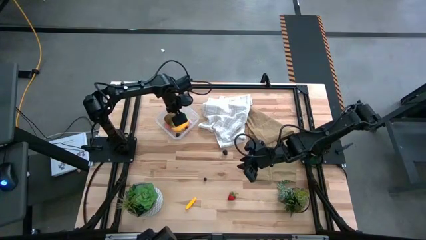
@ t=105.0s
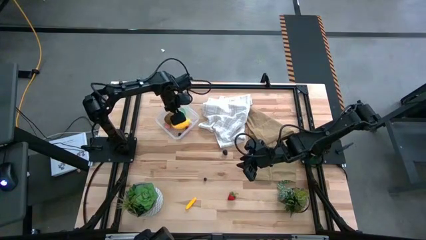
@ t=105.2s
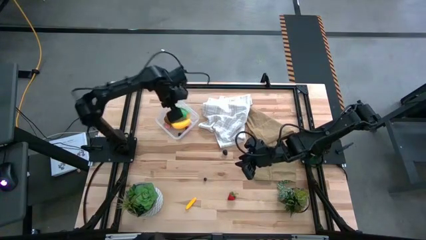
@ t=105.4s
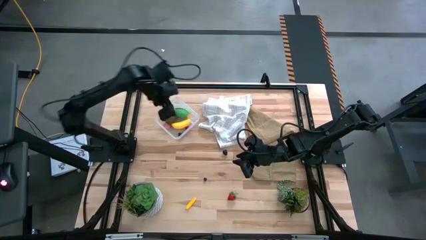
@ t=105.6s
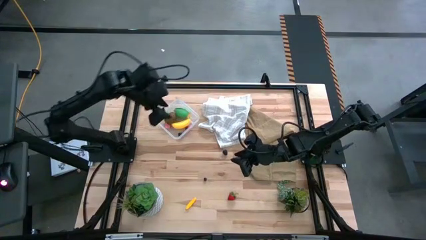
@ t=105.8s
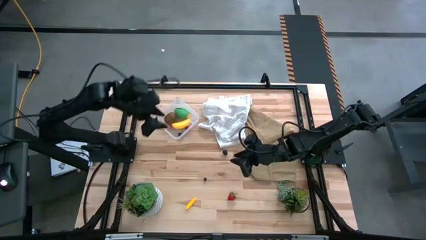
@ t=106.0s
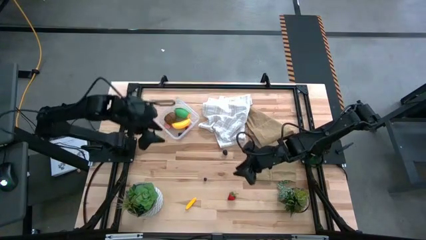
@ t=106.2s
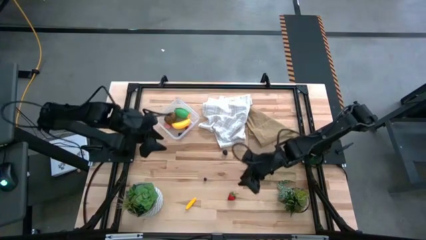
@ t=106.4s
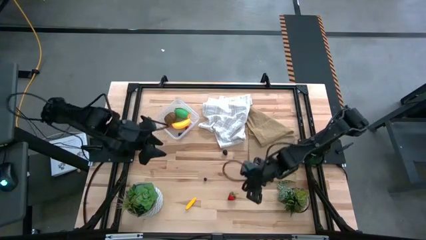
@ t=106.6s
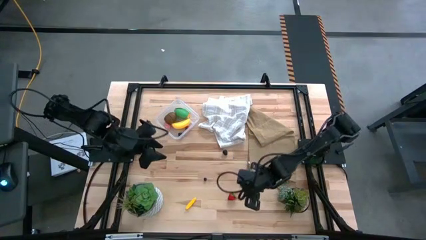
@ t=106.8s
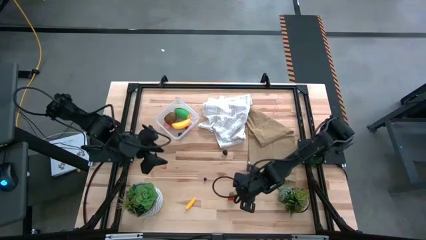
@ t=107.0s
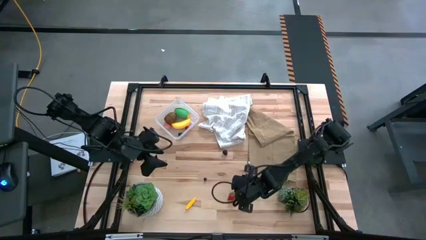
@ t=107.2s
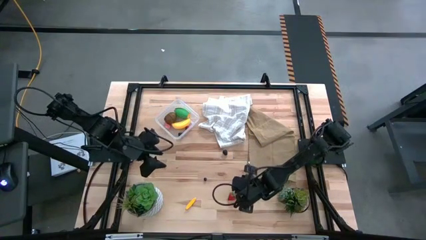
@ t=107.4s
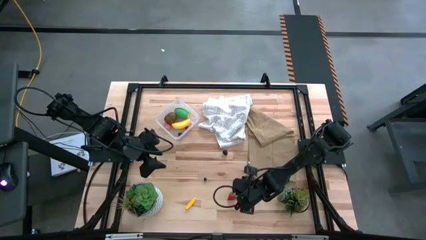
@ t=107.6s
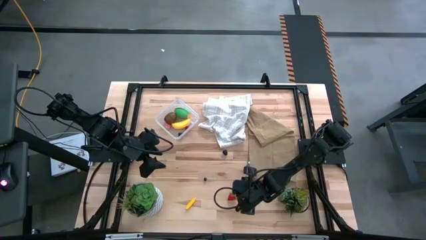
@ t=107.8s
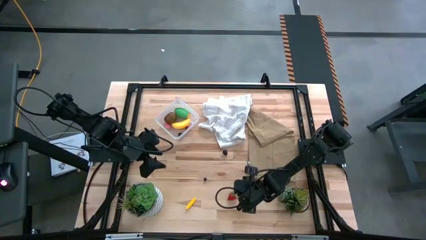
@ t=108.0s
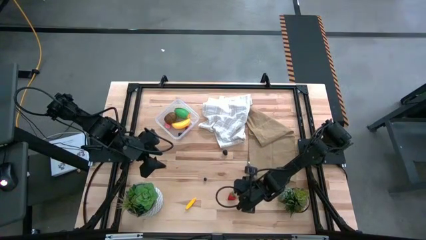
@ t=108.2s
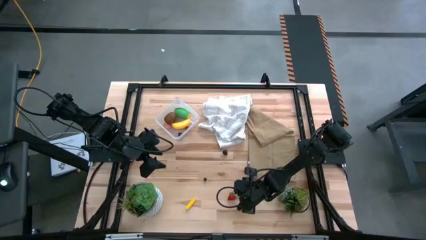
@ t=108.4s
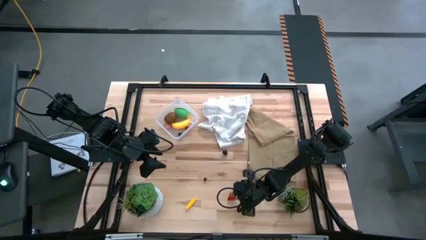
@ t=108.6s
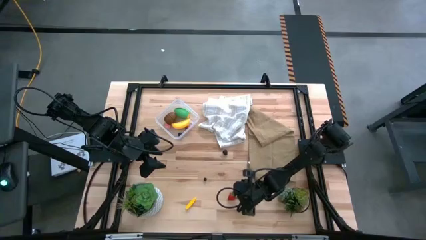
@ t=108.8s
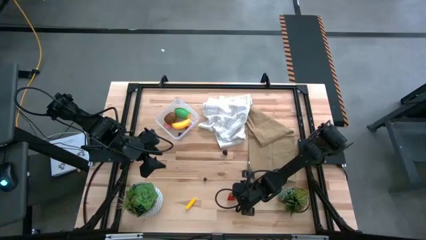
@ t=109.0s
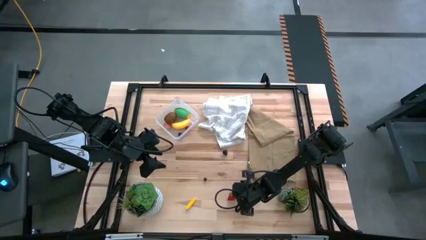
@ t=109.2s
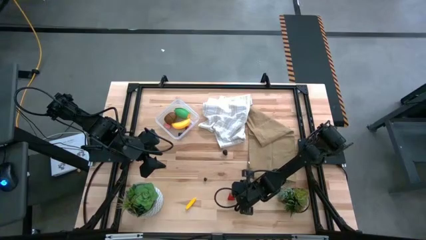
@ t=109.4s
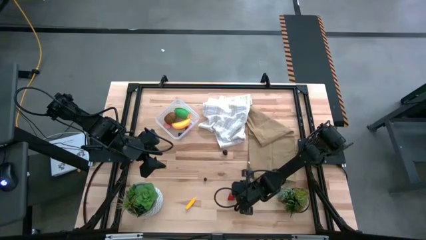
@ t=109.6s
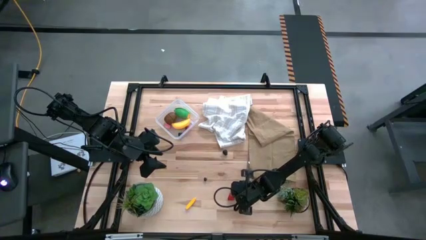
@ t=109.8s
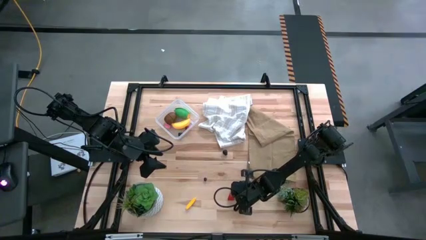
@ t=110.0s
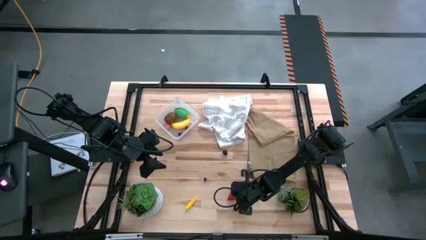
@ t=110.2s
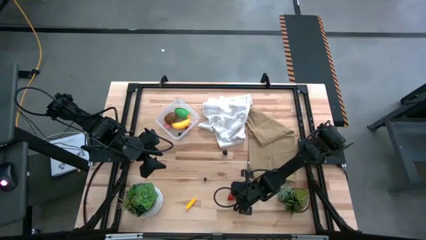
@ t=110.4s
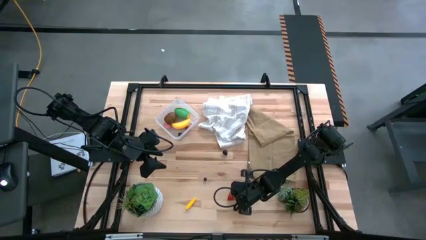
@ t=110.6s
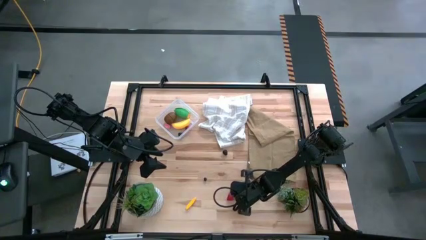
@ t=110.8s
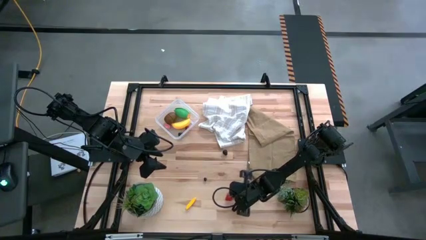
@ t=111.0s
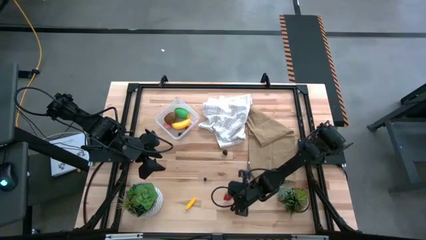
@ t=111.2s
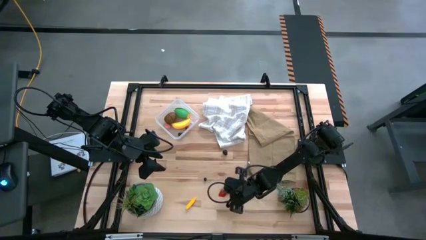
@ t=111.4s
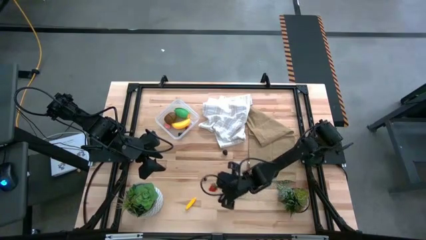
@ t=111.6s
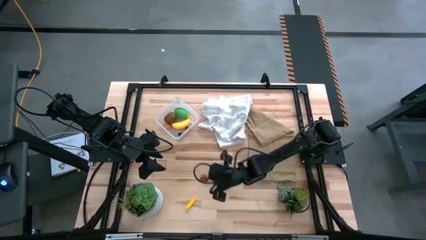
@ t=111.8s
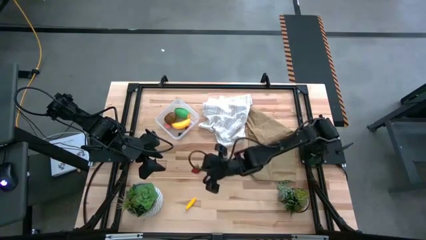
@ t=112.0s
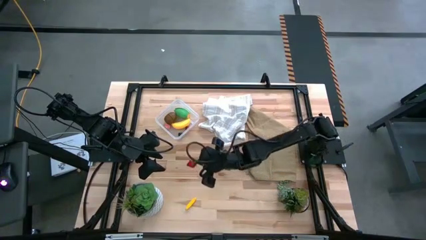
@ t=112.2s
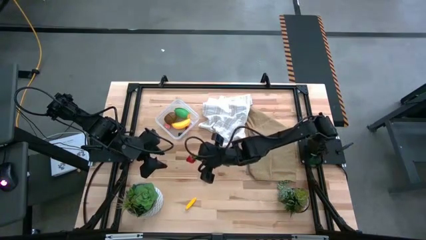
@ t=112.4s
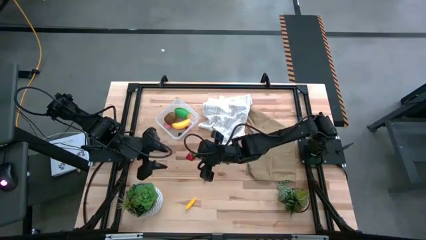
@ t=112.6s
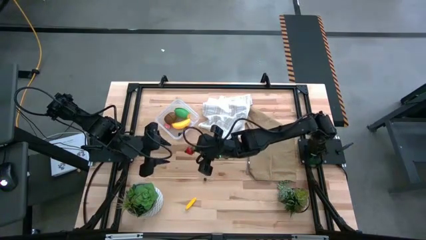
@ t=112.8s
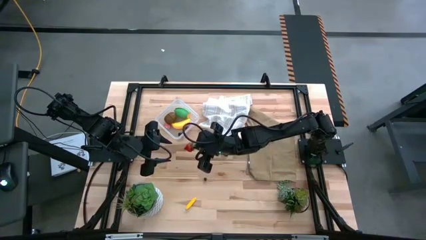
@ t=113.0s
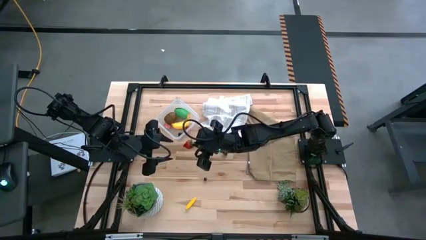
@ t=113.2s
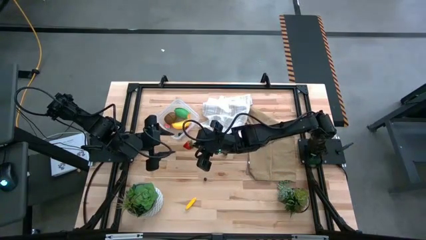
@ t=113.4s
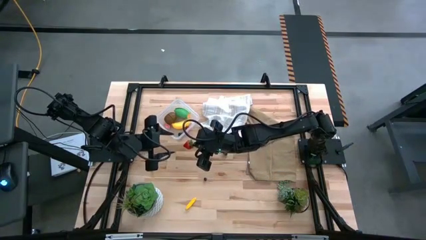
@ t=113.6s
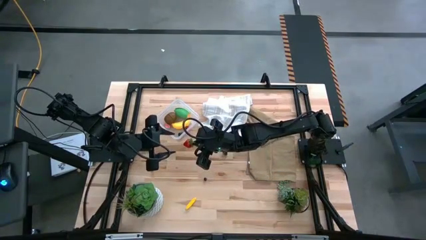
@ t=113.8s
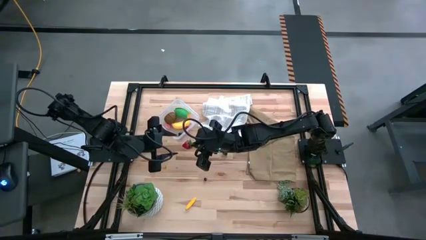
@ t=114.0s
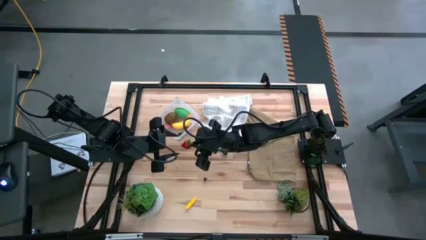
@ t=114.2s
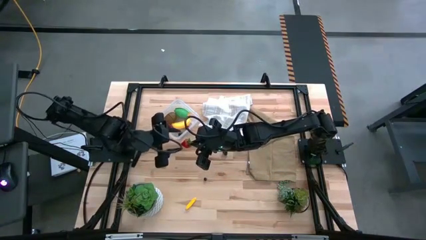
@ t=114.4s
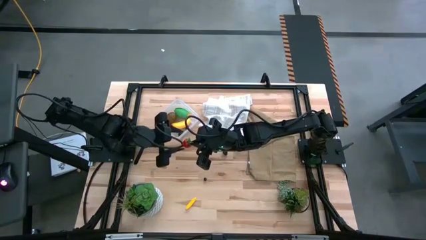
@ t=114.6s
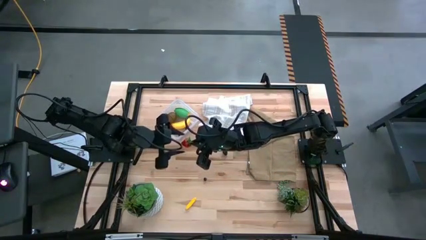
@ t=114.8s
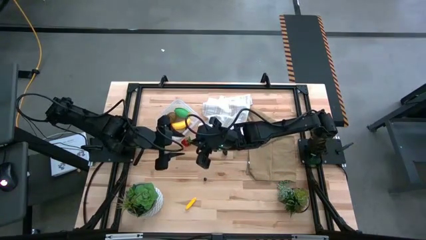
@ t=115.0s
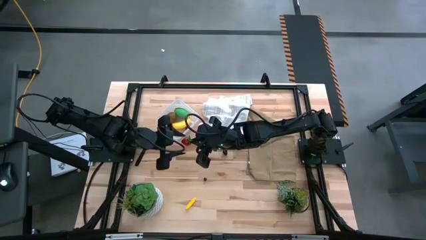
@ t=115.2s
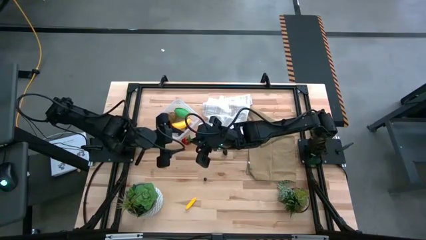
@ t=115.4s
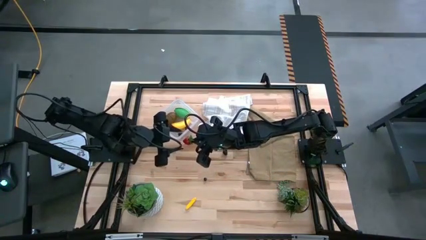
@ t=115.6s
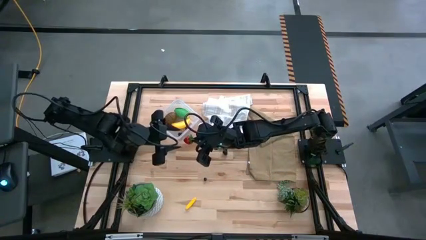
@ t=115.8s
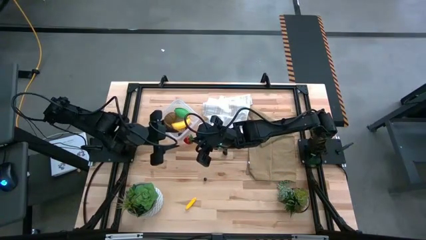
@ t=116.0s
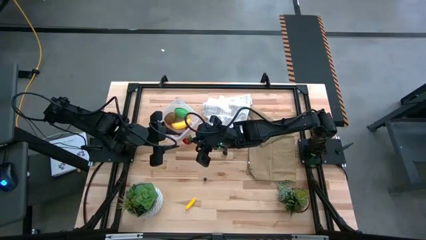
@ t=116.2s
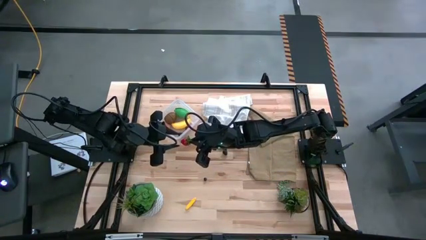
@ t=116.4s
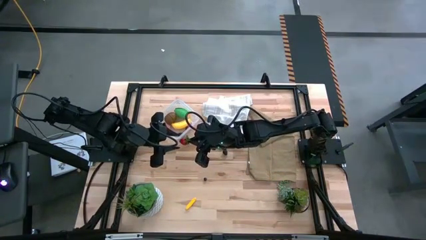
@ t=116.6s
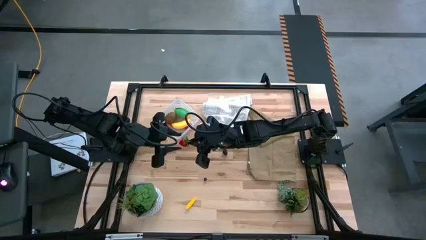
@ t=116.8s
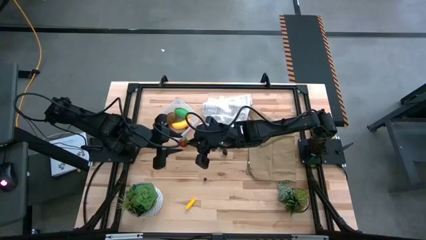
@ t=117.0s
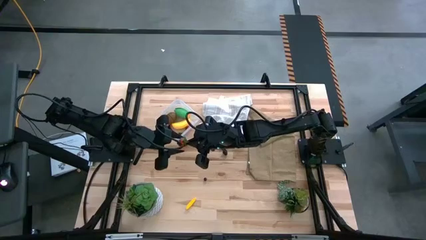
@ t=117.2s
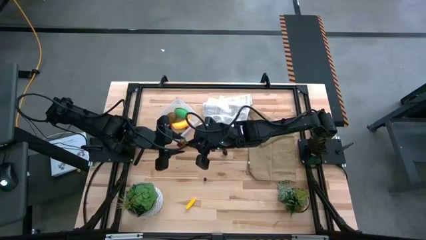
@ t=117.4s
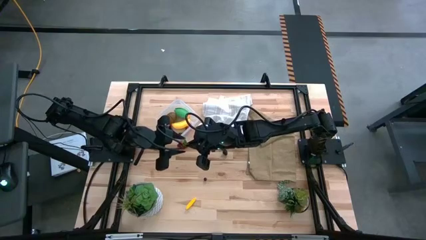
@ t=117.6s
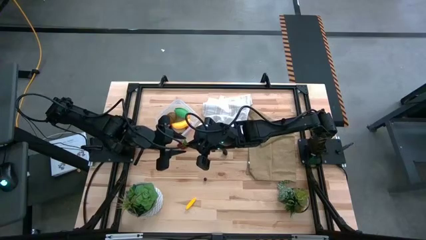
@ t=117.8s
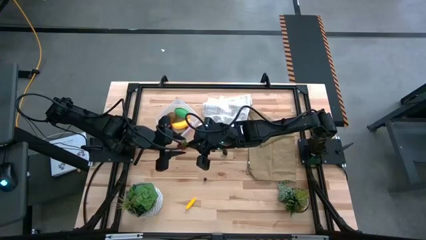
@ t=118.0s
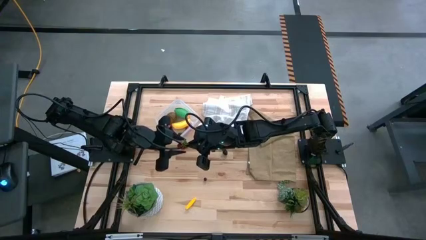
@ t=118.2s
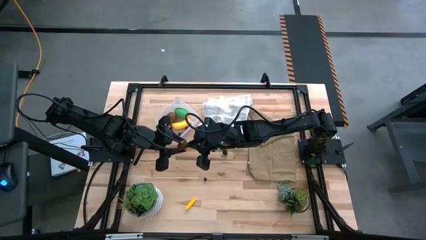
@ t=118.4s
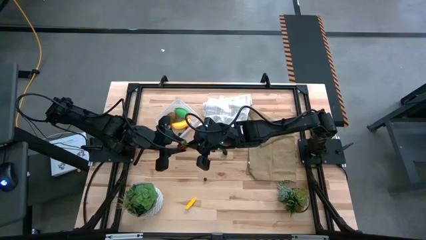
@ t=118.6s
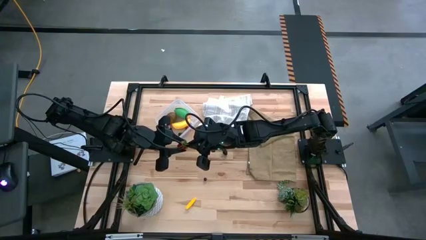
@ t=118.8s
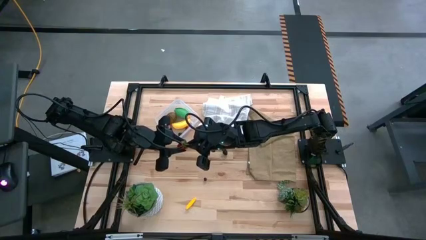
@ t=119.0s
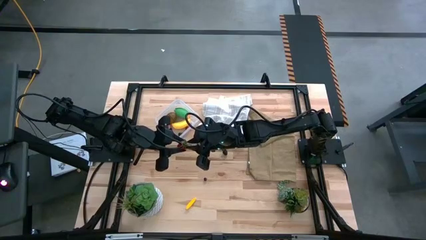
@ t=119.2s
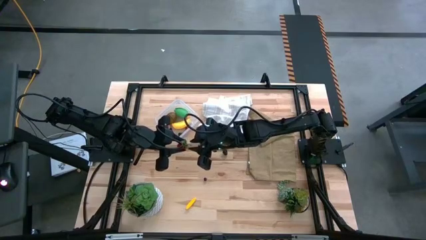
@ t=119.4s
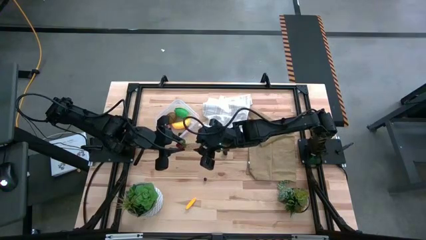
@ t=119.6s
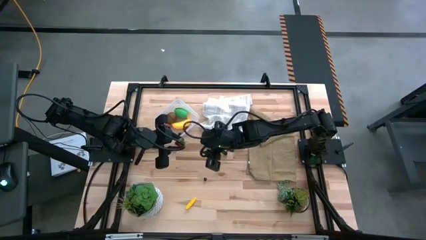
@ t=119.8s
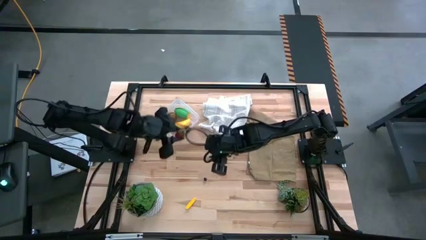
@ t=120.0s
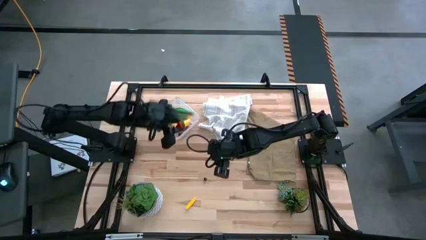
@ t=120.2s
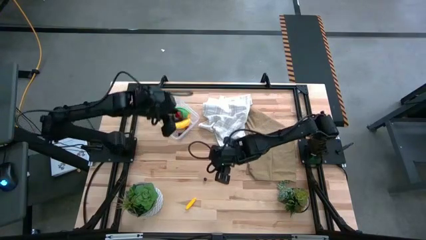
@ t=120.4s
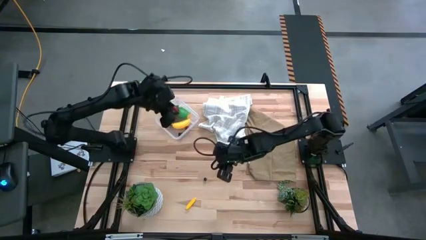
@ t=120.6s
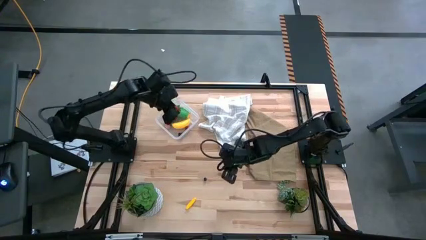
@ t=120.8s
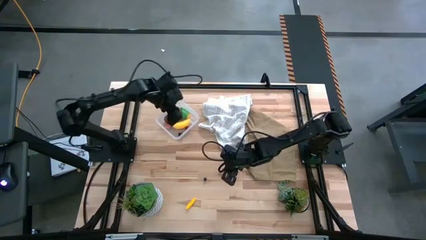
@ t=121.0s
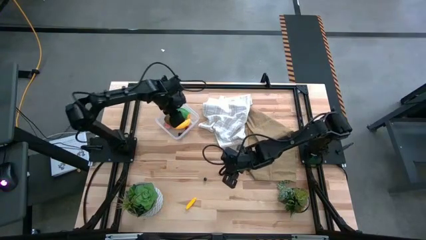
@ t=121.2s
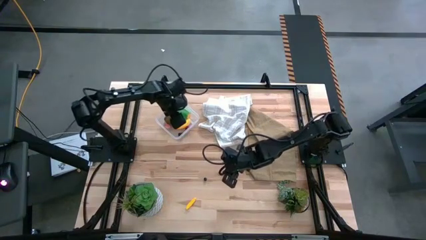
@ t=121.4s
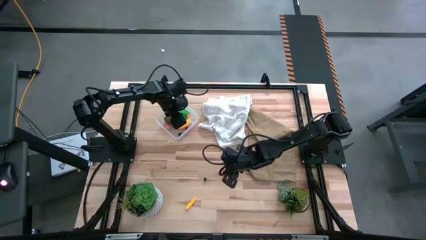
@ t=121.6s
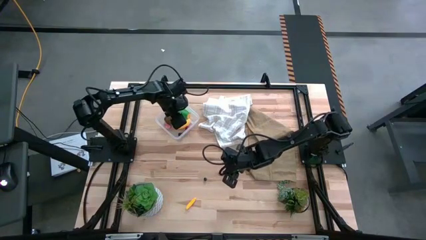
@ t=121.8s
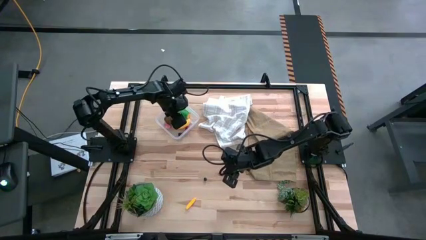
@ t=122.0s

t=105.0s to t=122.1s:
Task: Pick and placing Produce into tupperware
Put the red strawberry into the transparent bin
